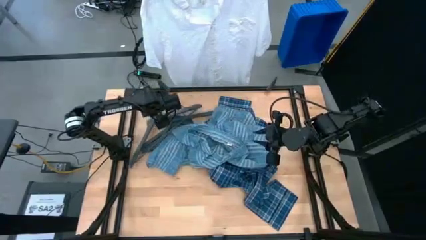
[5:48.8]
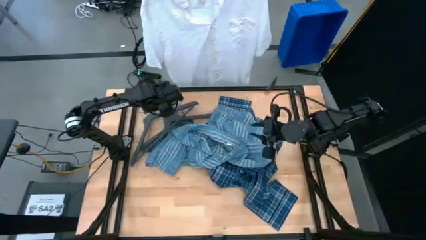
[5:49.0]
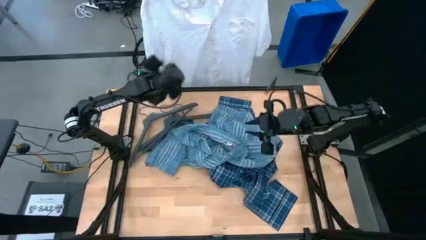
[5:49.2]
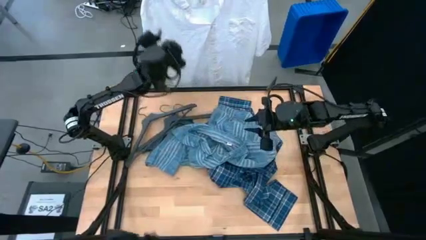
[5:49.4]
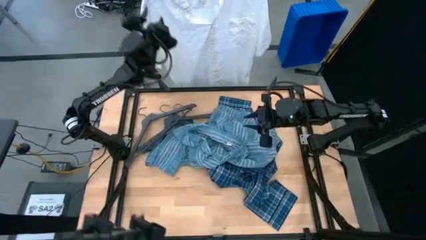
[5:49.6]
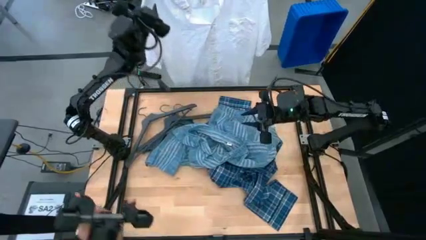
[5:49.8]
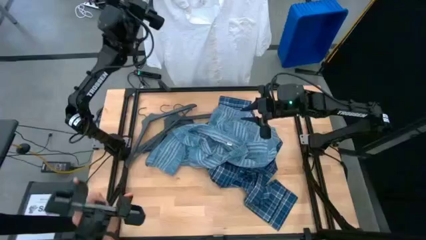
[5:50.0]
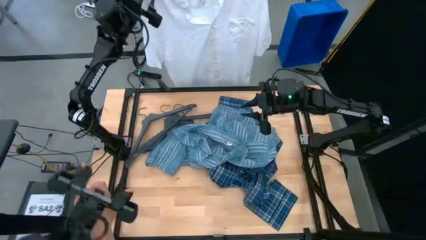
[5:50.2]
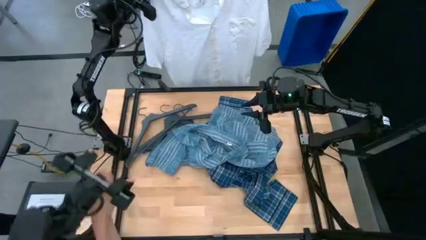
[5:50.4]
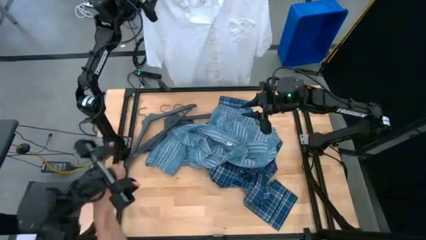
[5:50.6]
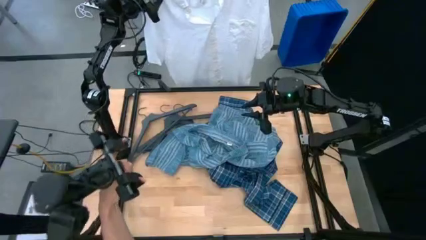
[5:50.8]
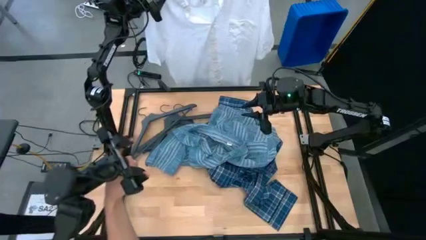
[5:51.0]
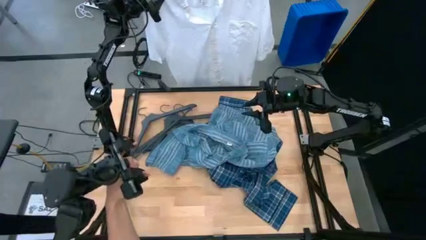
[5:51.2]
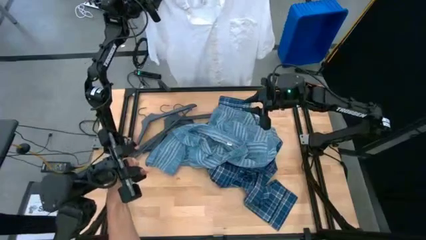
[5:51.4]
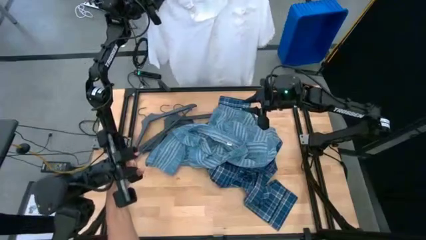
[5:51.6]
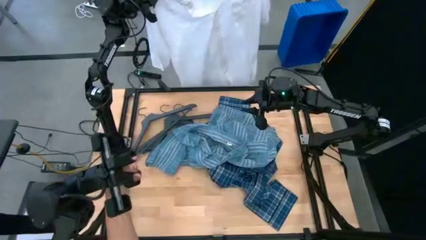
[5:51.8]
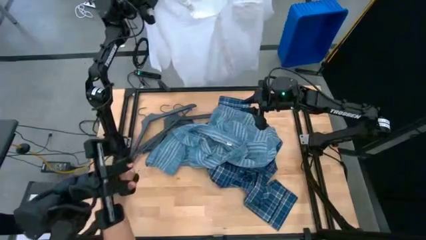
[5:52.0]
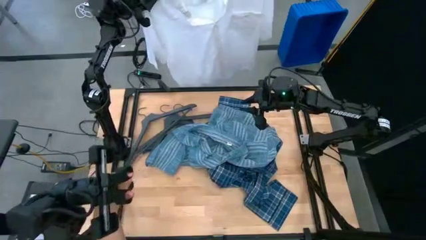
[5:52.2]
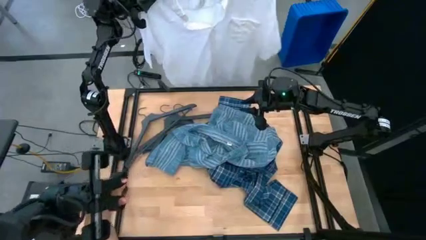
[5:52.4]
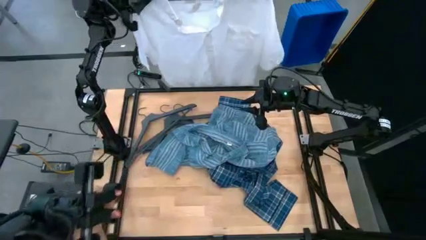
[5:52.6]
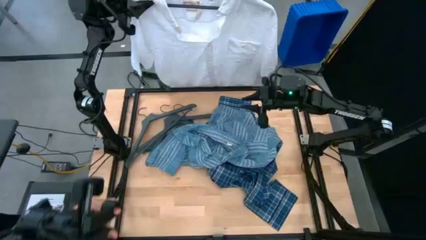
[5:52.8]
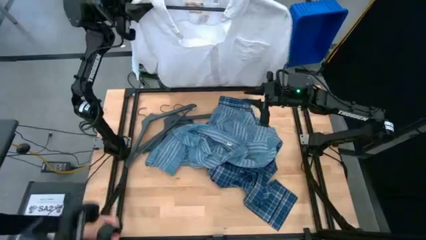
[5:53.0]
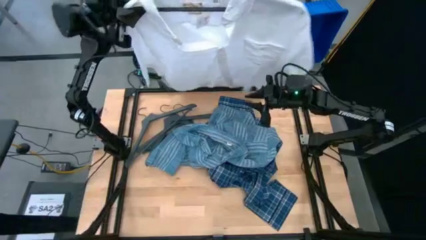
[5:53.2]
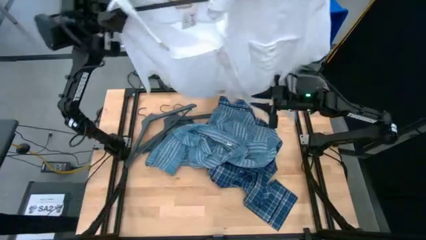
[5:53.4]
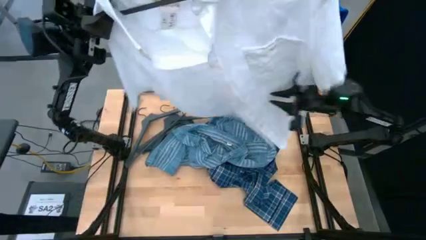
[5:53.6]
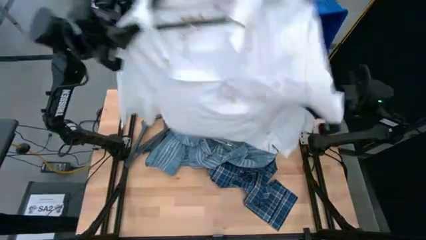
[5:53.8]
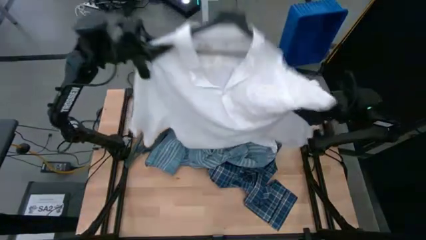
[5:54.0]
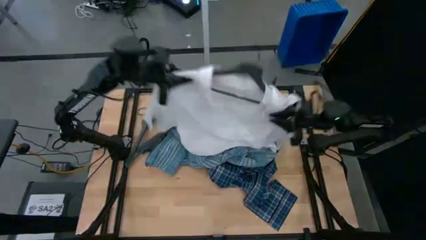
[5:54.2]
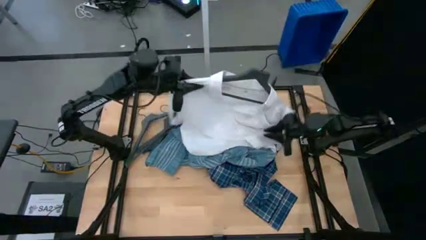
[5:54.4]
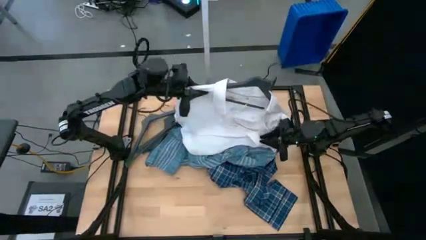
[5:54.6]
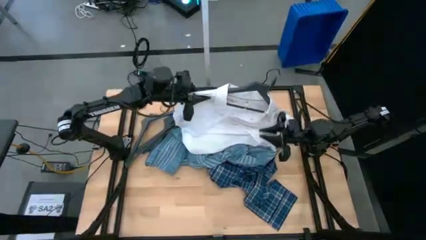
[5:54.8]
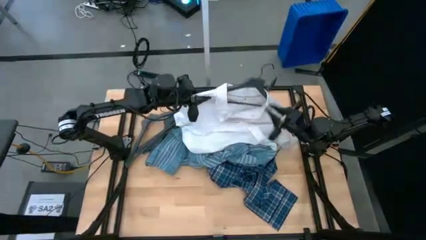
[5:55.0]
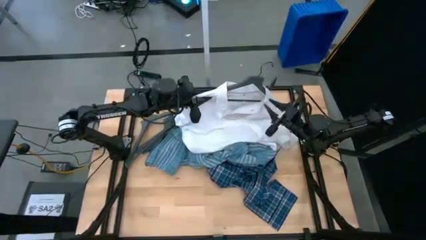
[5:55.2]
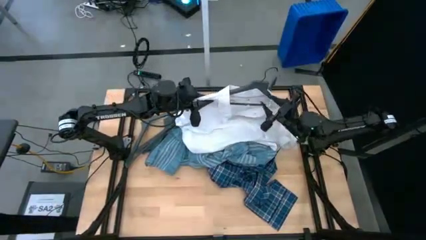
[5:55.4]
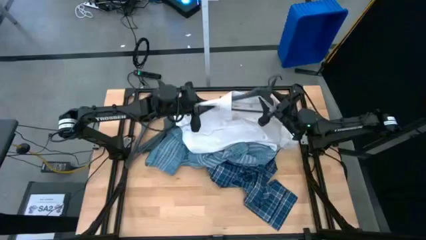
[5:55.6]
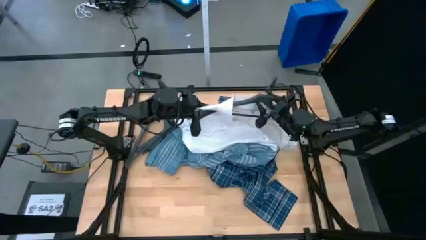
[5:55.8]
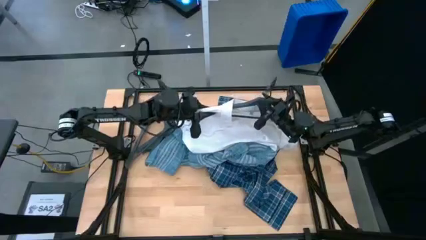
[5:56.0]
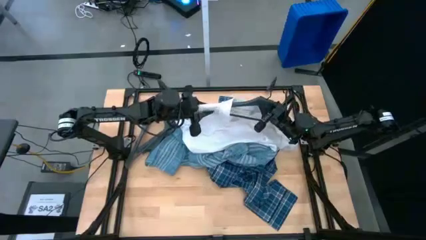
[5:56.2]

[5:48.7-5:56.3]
Task: Hang clothes
Unhang the white shirt from the hanging rack

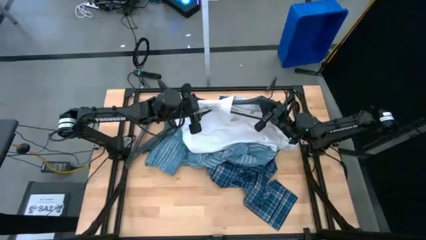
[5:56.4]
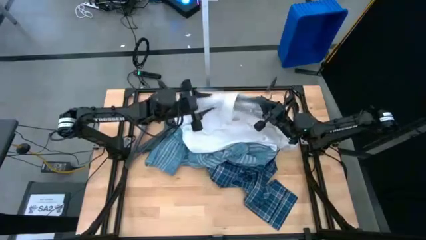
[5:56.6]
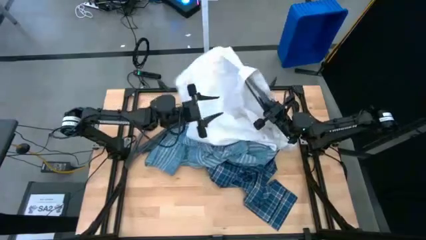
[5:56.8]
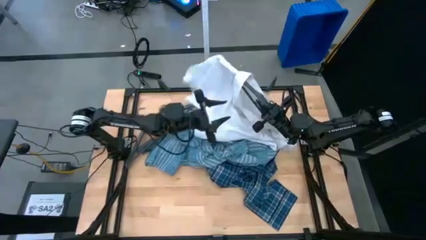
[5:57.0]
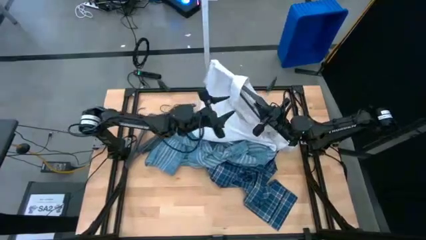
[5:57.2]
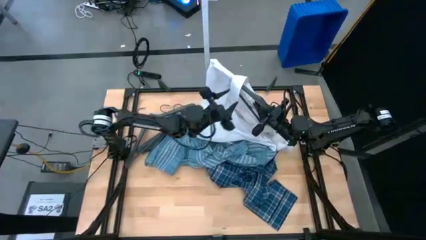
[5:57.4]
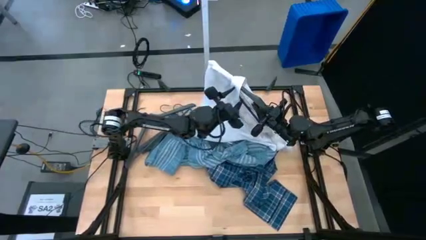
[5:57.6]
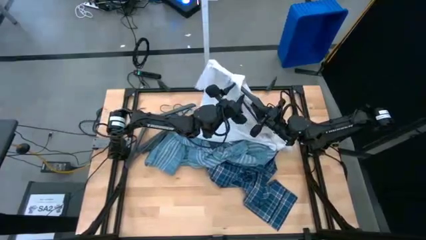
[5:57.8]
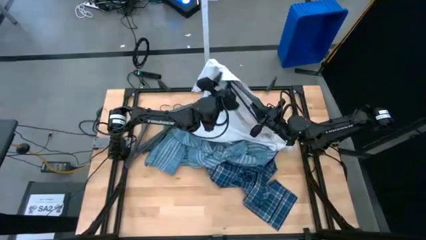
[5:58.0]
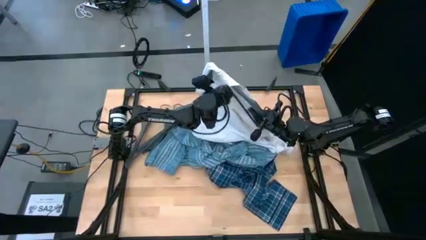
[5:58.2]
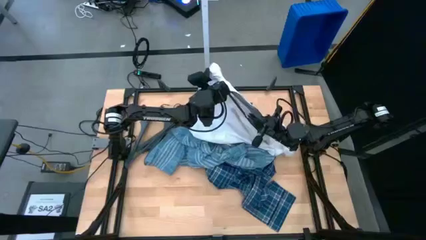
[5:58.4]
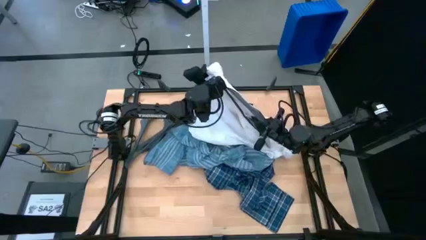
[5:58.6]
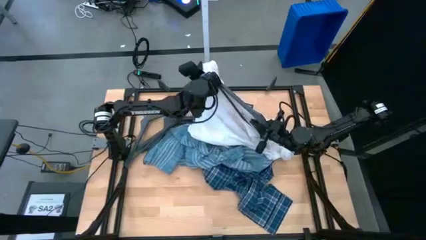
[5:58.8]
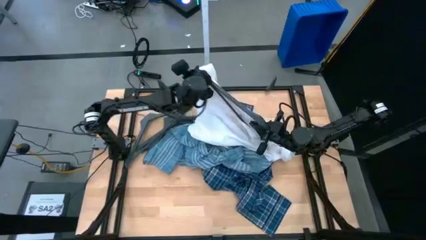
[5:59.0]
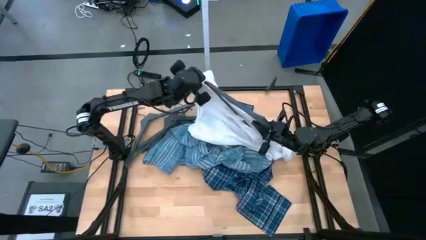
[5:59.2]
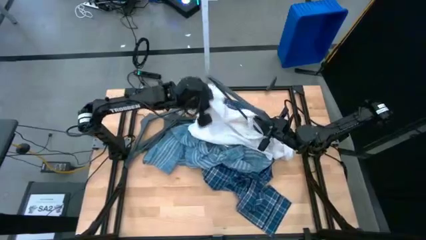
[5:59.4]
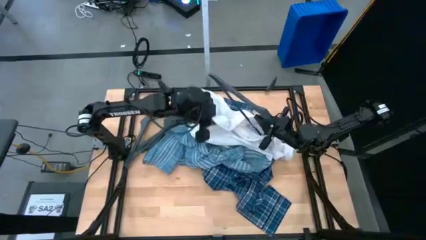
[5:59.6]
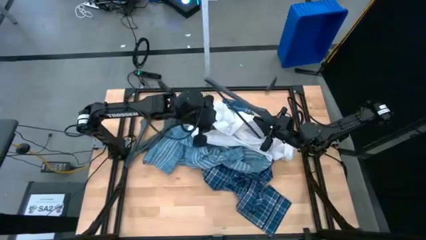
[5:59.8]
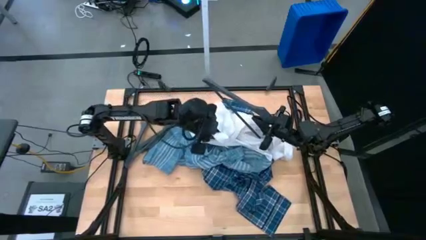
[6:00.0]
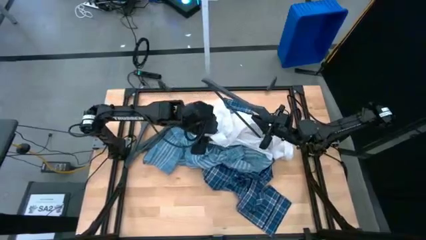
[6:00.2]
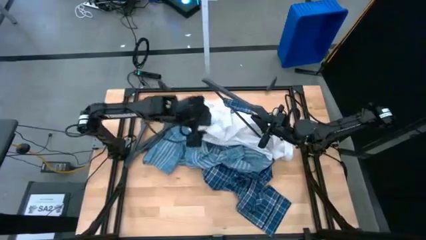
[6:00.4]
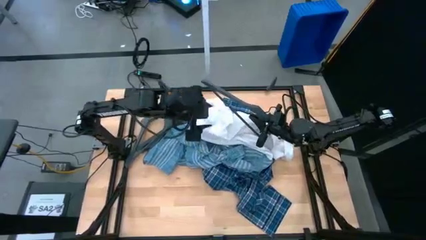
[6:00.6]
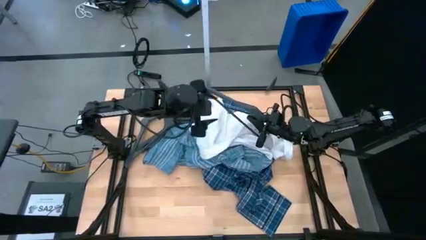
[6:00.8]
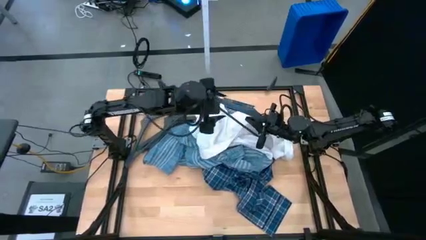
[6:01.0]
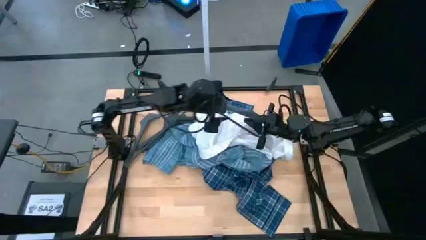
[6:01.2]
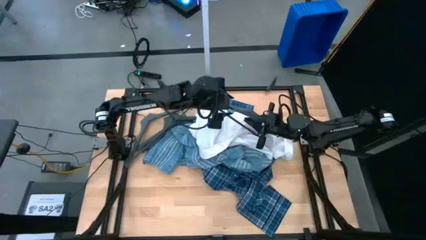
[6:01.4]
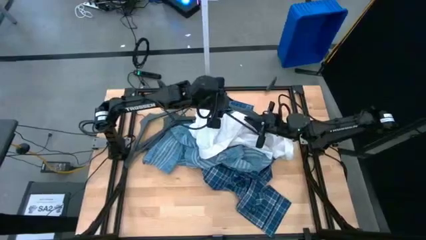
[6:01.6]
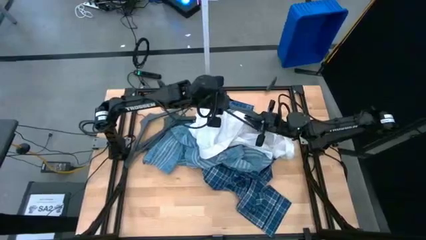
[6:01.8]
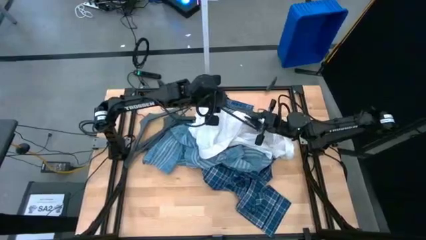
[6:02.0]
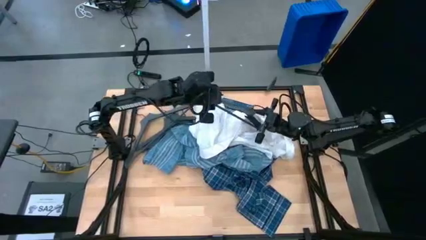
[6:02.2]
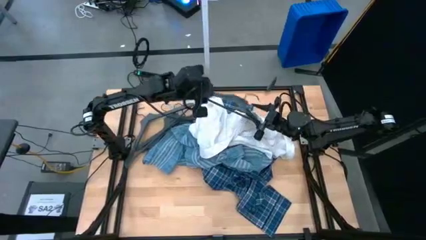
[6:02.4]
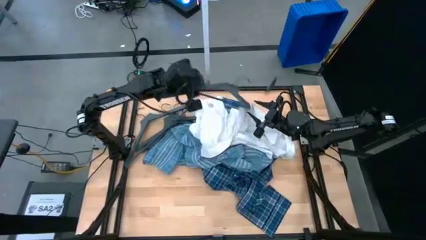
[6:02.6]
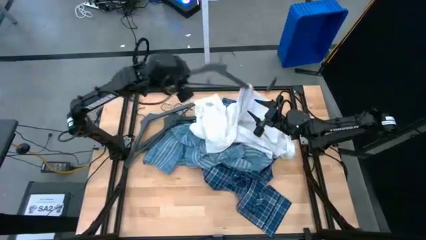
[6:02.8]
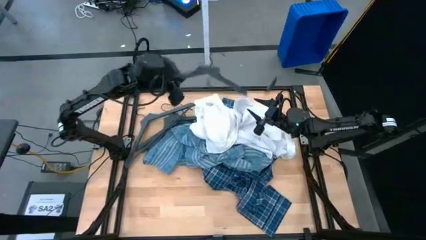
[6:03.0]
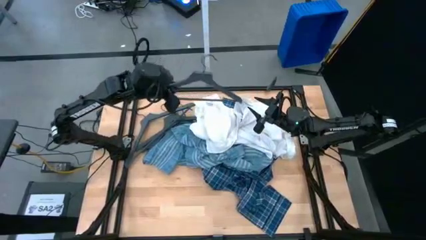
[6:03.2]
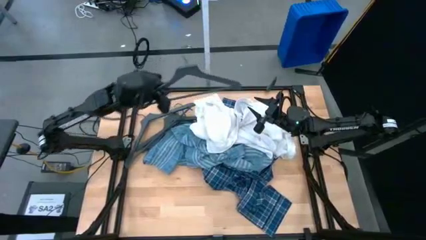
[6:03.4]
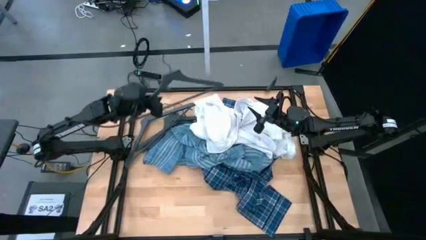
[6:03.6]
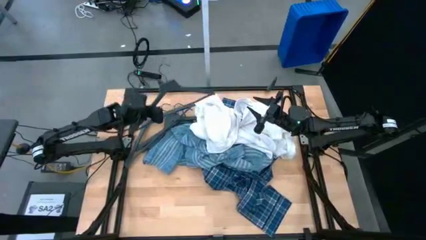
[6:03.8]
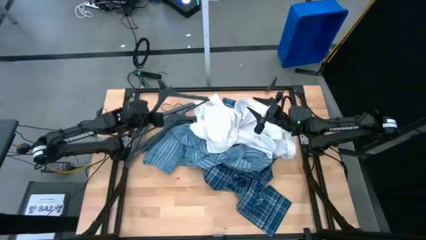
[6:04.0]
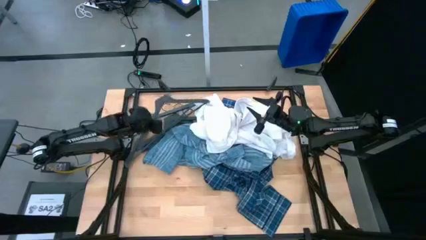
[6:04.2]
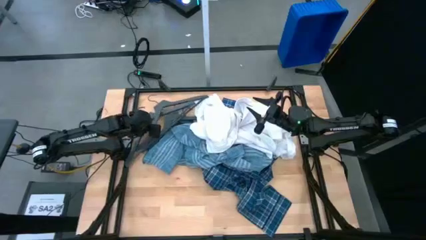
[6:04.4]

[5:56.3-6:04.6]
Remove the black hanger from the white shirt
